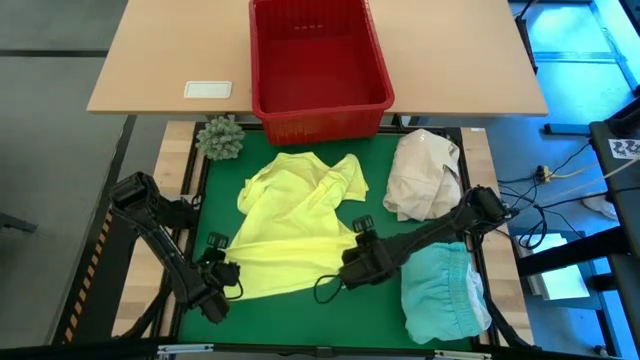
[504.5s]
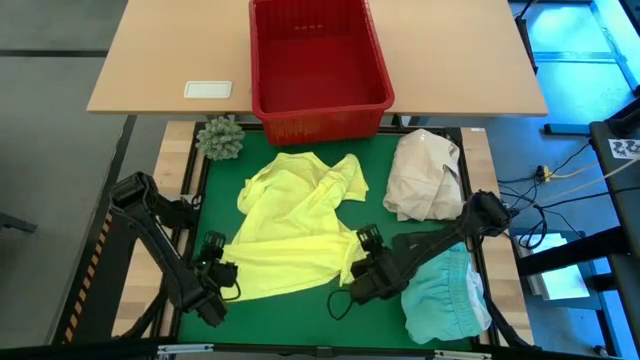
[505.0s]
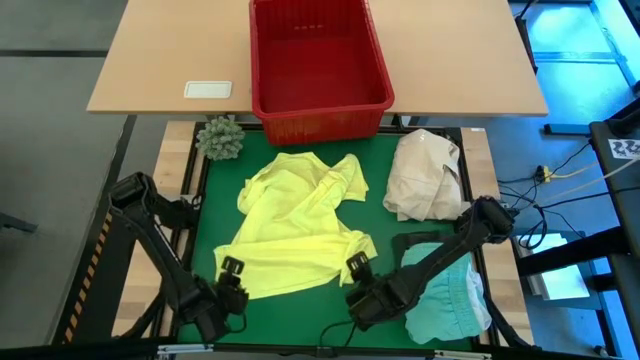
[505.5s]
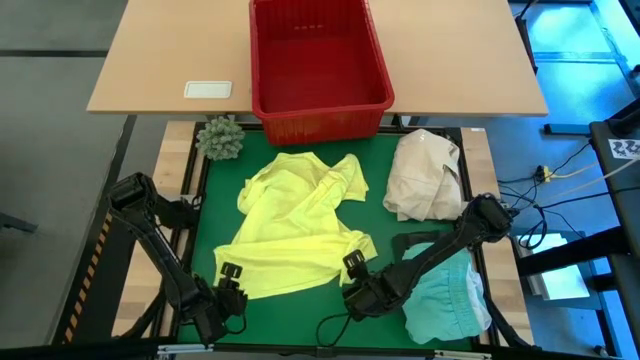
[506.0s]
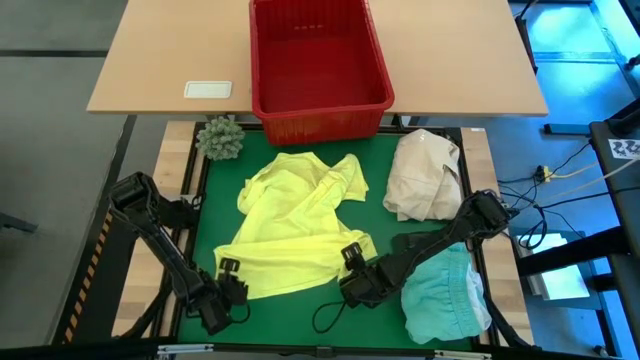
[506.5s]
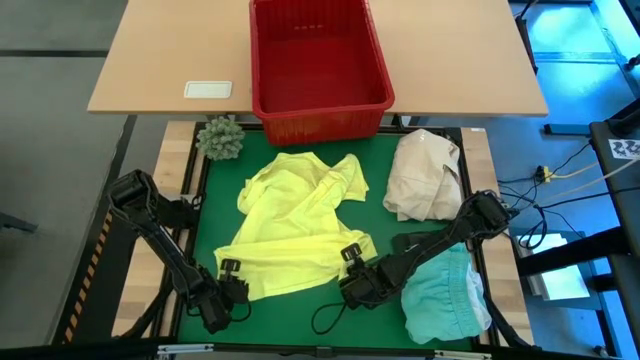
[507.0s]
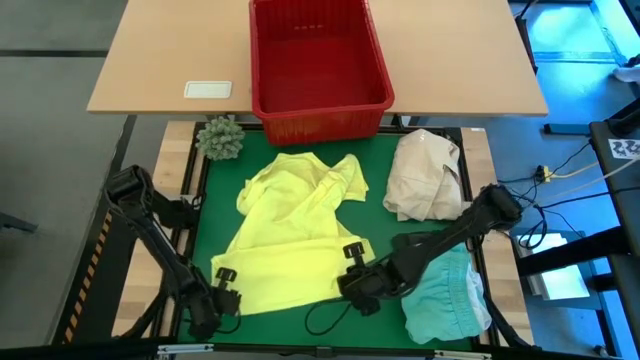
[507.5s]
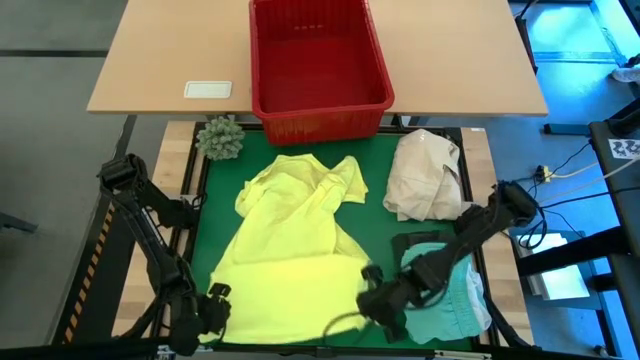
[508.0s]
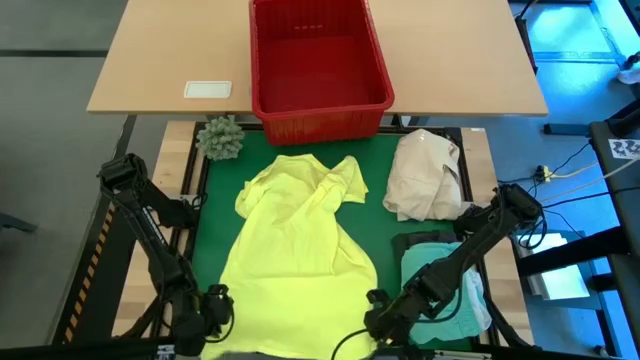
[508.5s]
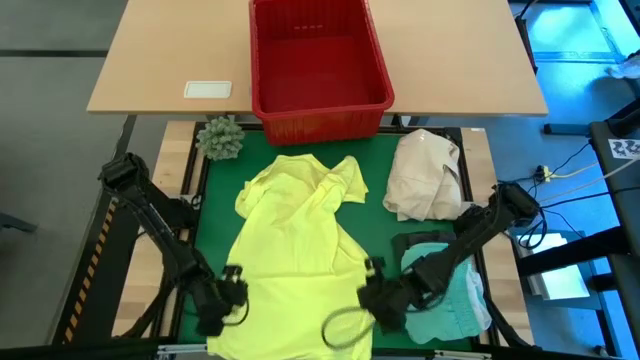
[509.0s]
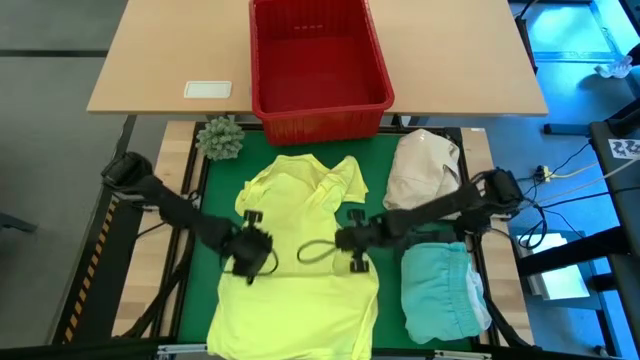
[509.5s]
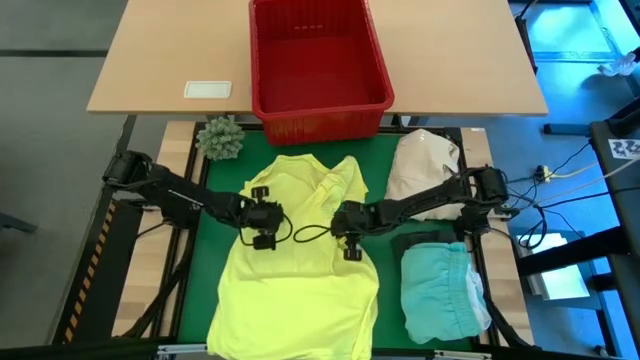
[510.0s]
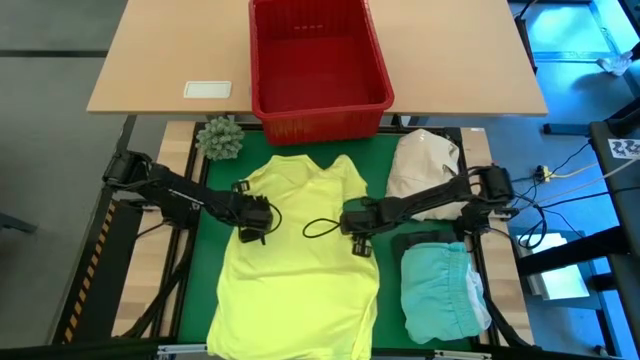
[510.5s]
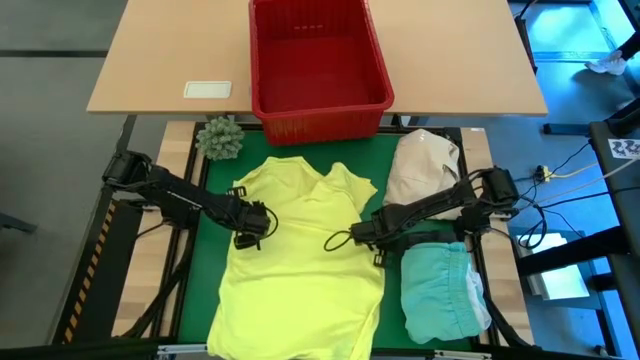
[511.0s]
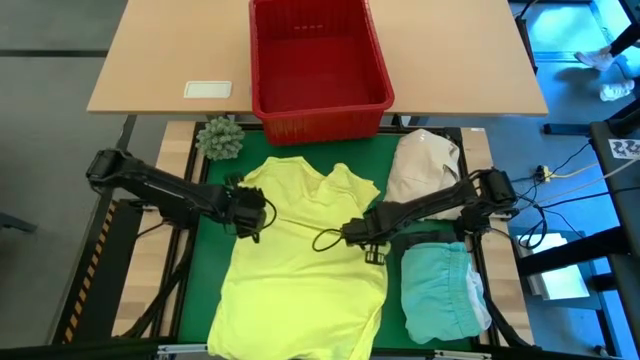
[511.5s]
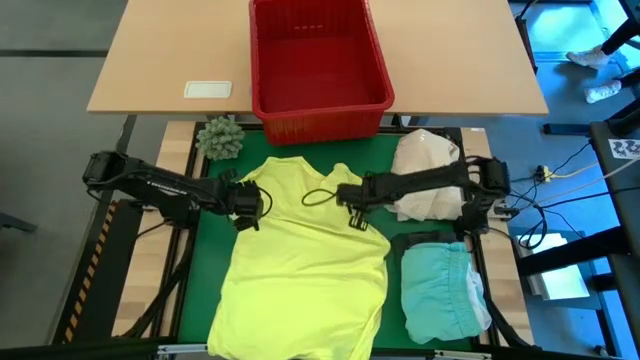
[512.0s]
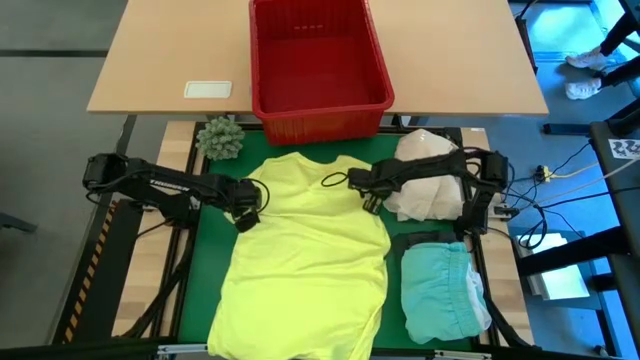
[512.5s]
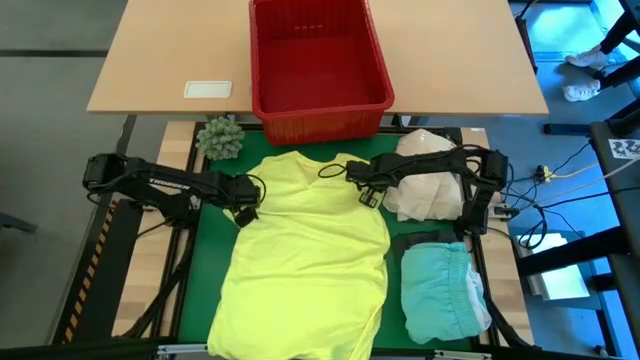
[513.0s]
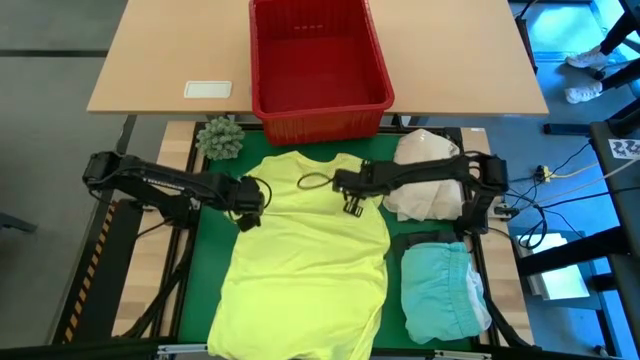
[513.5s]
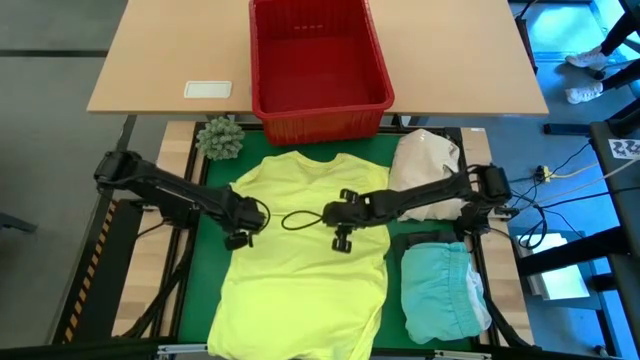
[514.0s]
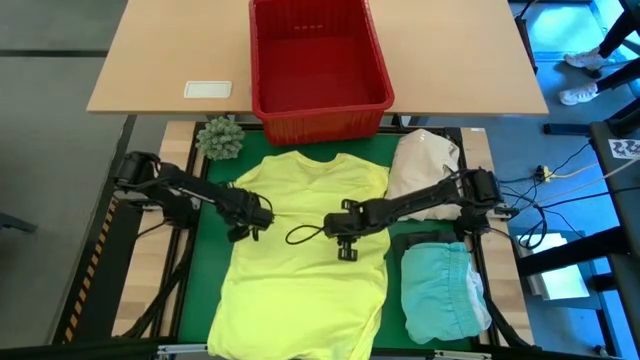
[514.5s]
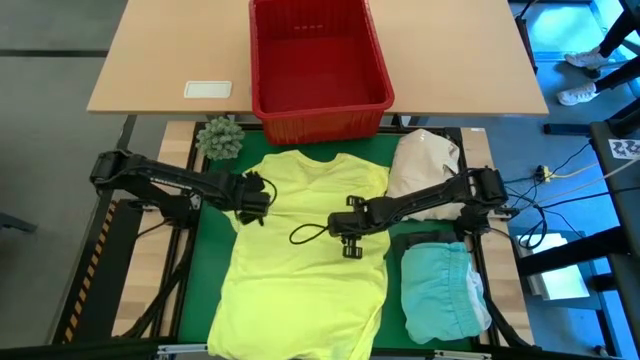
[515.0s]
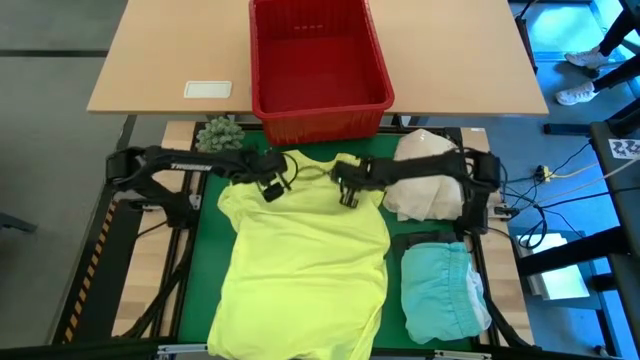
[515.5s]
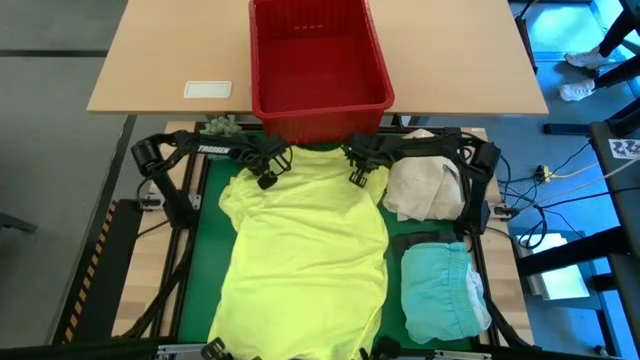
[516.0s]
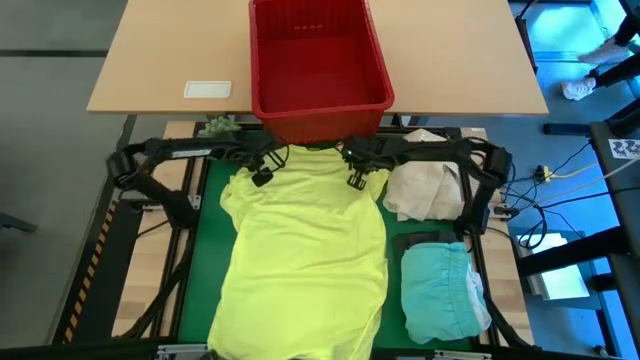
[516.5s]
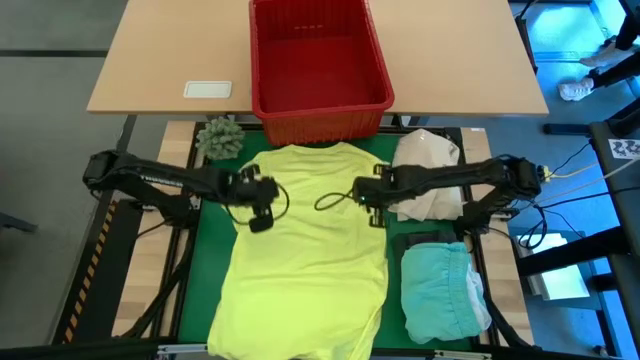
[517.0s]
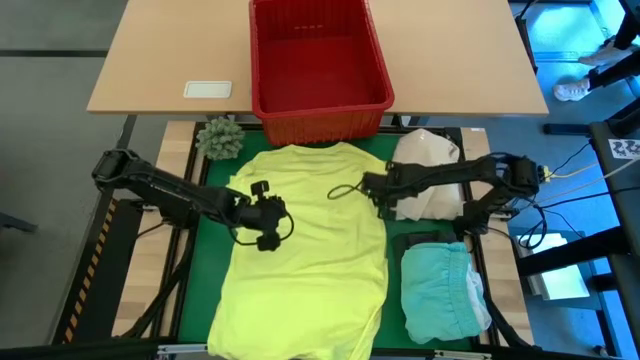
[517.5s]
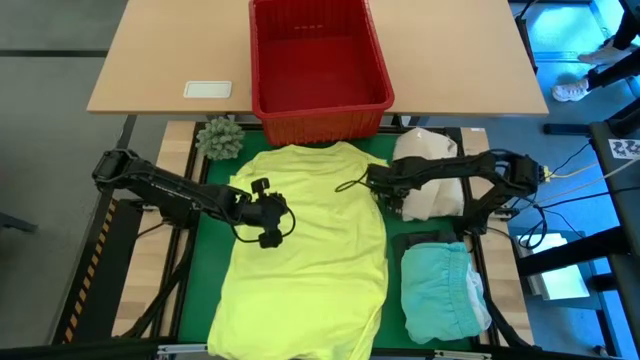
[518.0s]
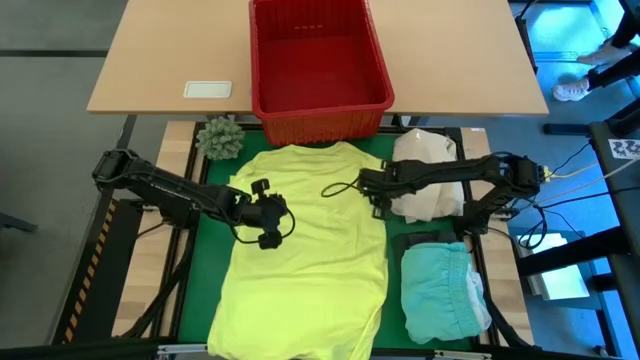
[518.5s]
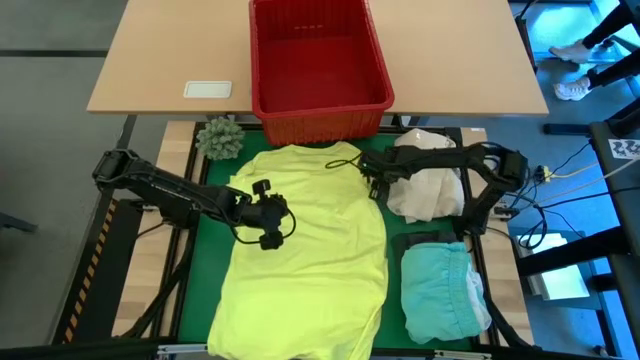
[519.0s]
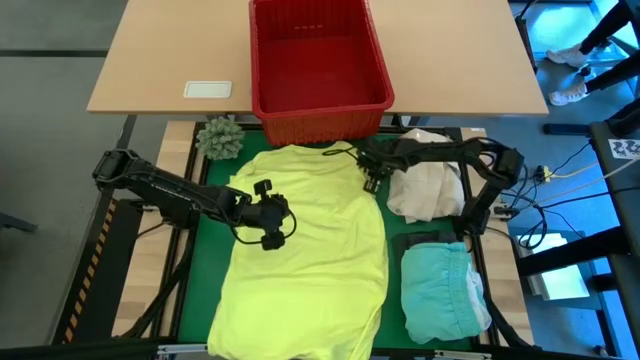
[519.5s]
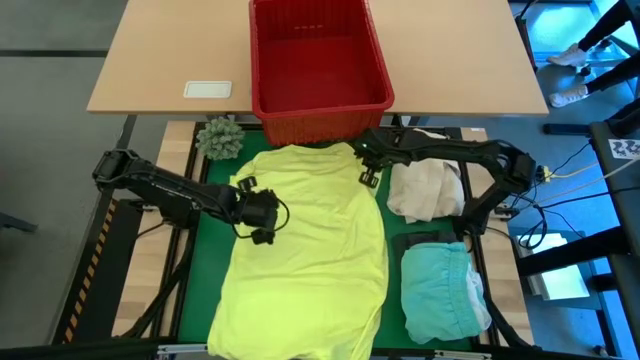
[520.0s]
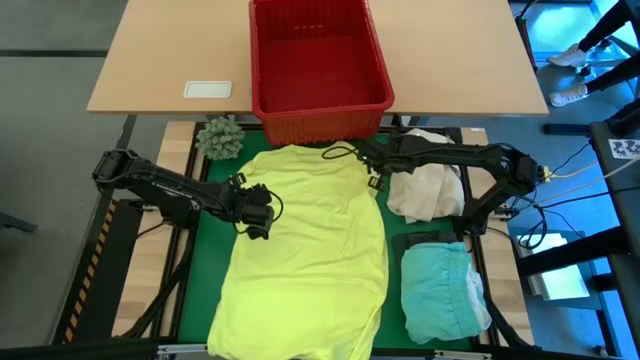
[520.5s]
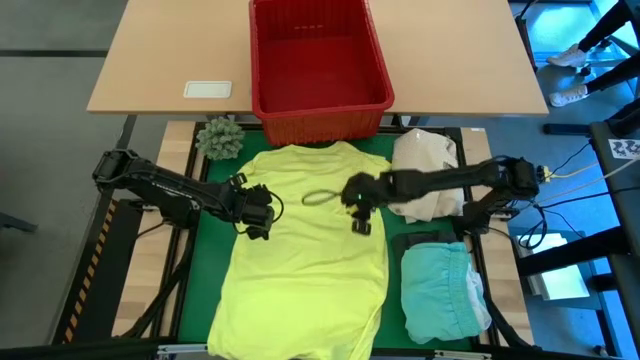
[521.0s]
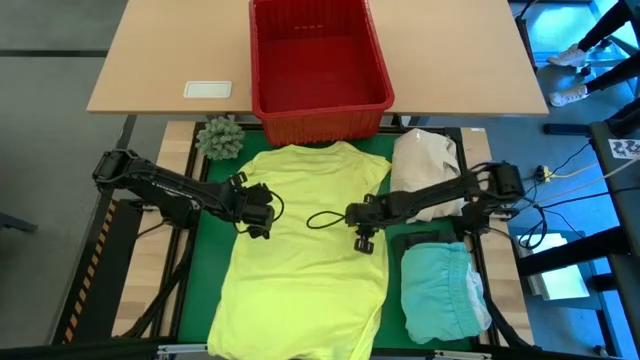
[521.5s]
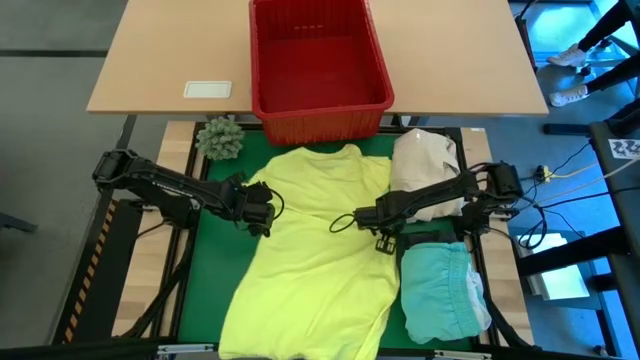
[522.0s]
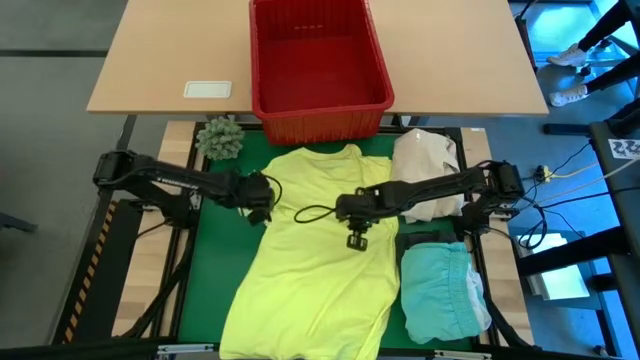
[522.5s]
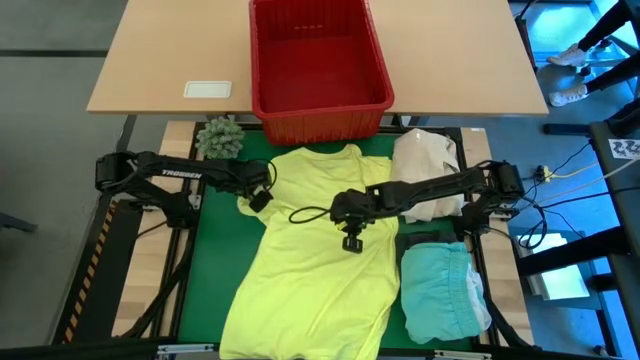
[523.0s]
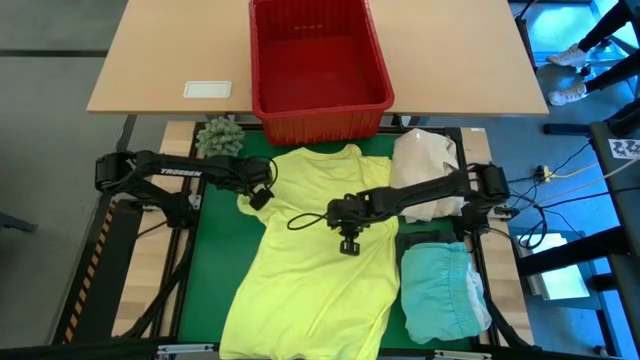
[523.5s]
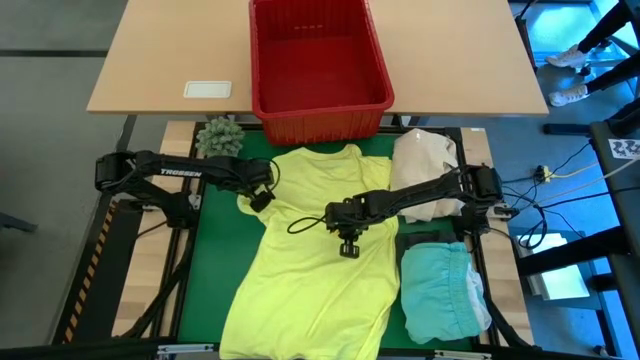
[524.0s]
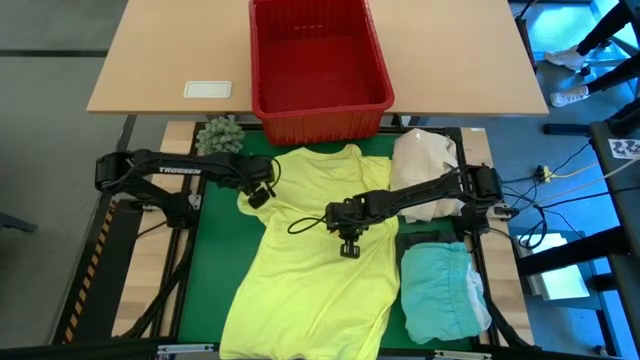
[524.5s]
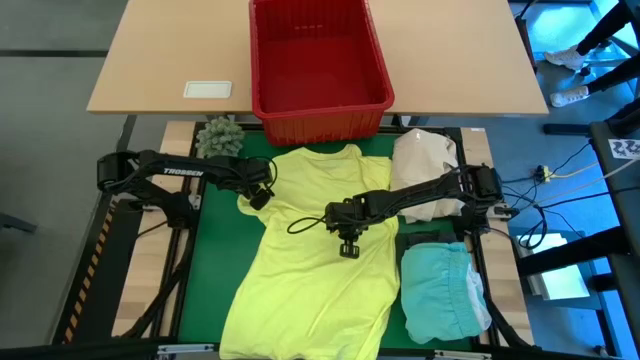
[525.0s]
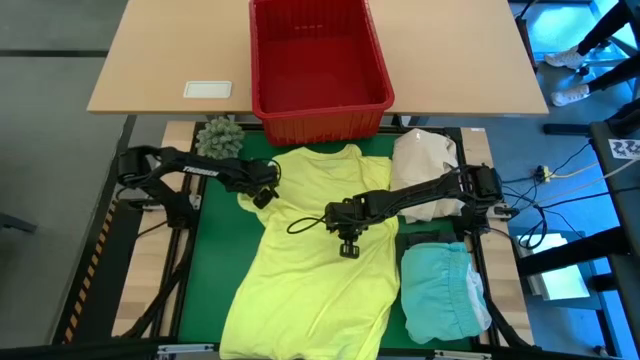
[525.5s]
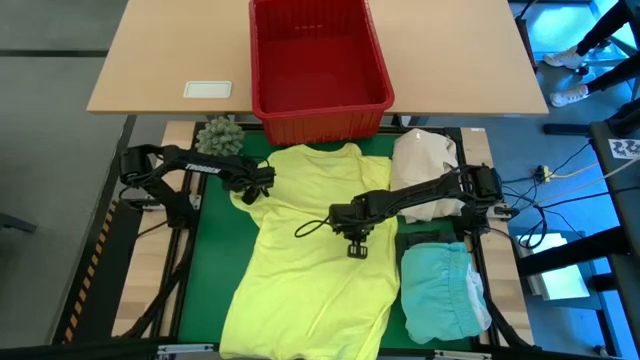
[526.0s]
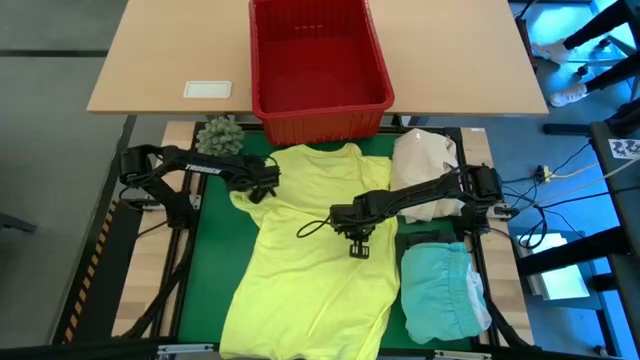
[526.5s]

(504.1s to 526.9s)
Task: Fold Laundry from Bin
Fold the yellow shirt
